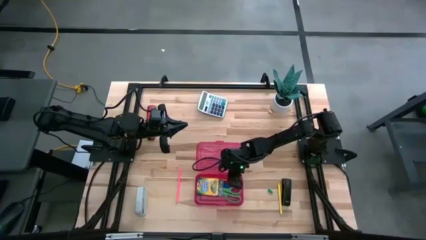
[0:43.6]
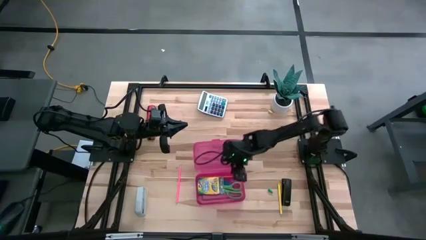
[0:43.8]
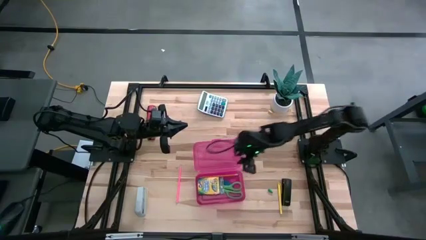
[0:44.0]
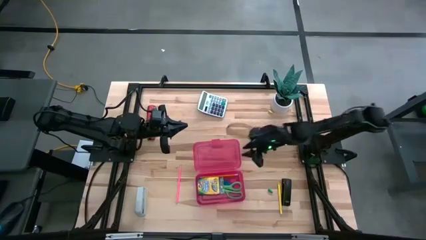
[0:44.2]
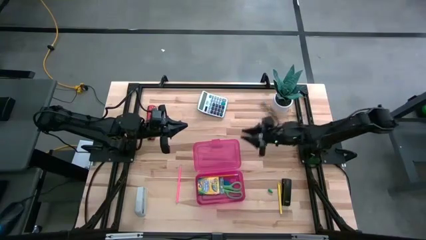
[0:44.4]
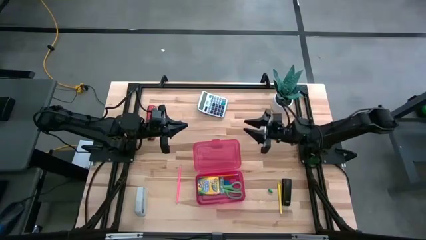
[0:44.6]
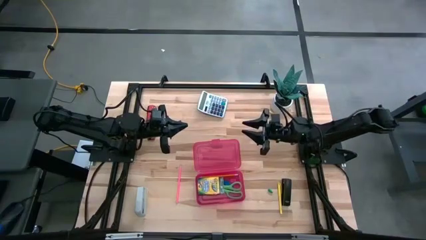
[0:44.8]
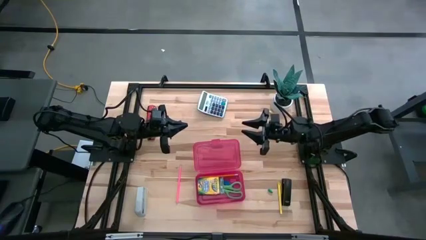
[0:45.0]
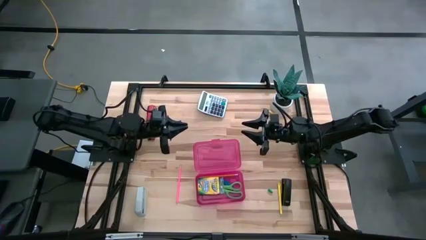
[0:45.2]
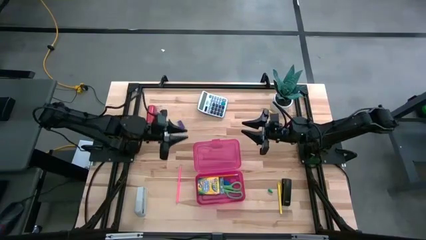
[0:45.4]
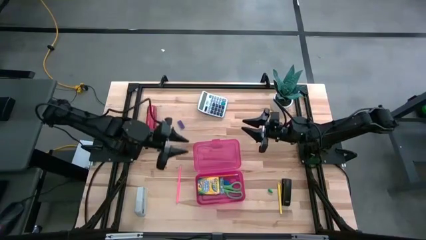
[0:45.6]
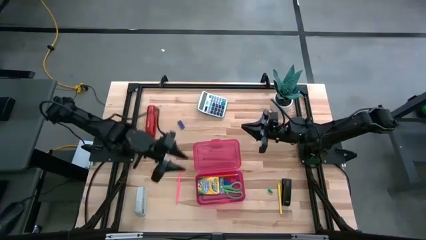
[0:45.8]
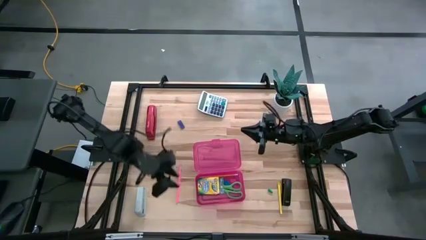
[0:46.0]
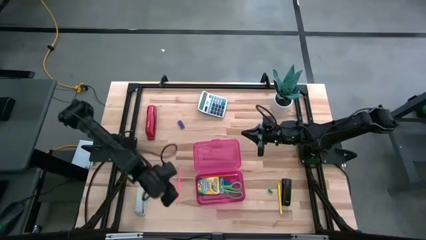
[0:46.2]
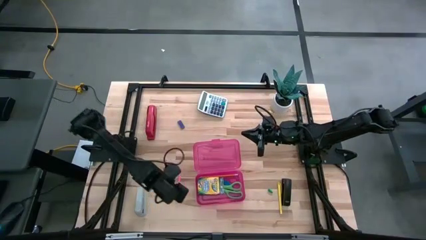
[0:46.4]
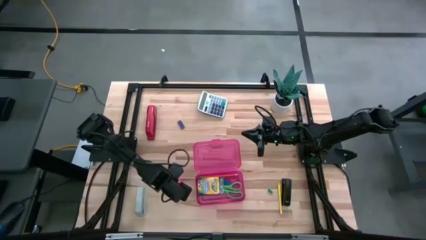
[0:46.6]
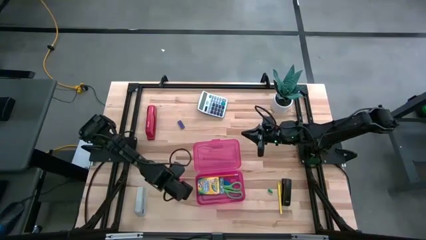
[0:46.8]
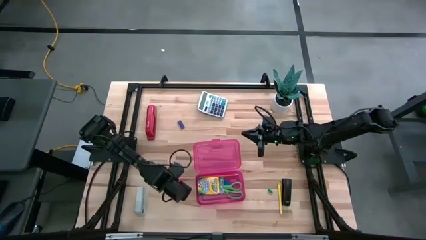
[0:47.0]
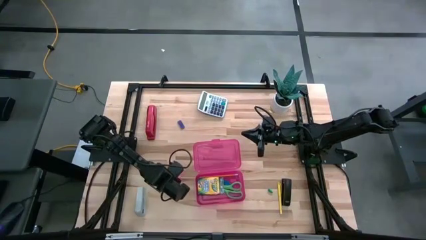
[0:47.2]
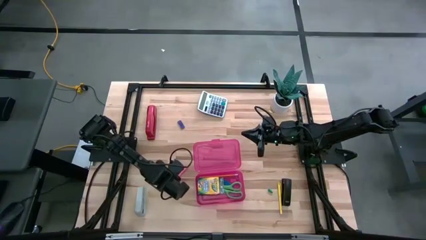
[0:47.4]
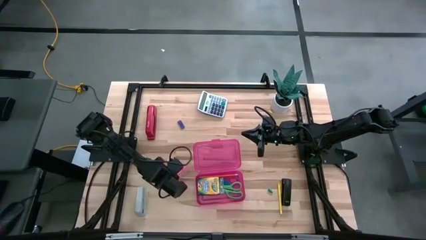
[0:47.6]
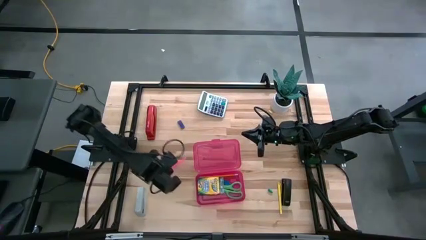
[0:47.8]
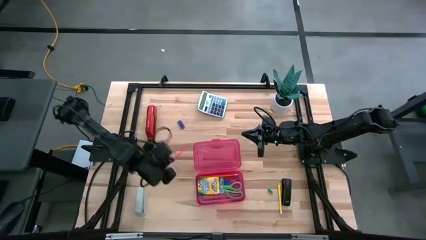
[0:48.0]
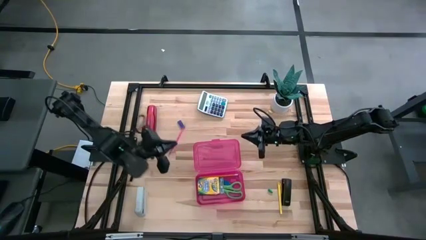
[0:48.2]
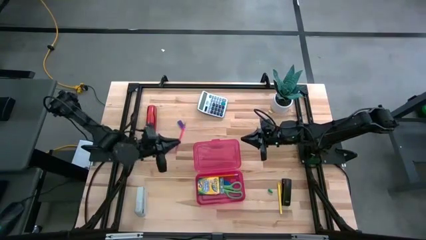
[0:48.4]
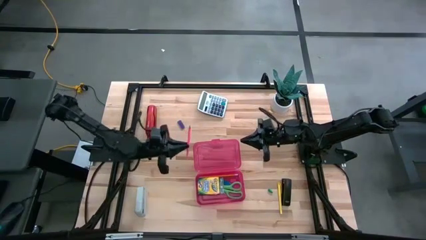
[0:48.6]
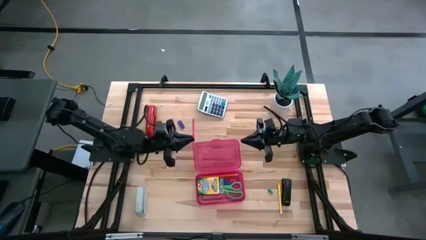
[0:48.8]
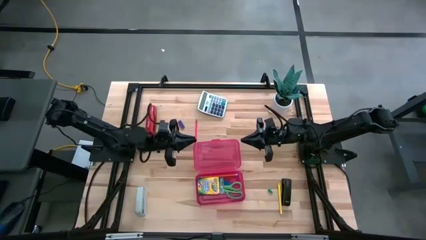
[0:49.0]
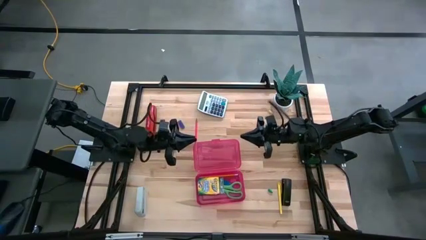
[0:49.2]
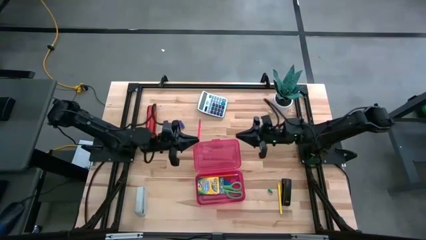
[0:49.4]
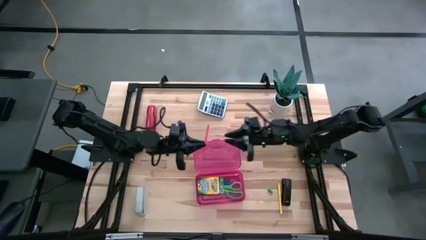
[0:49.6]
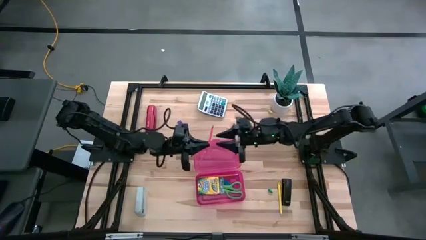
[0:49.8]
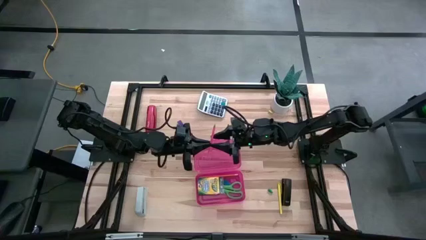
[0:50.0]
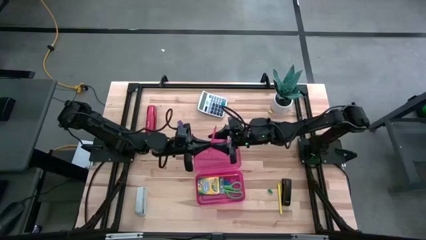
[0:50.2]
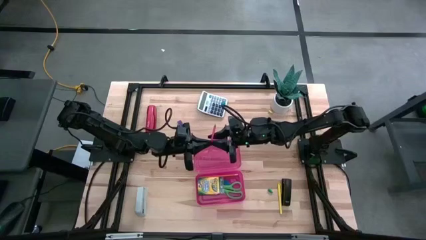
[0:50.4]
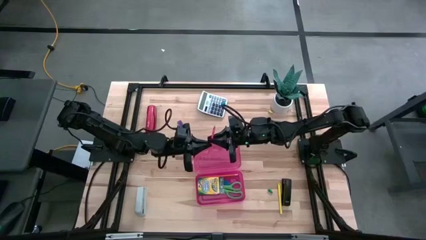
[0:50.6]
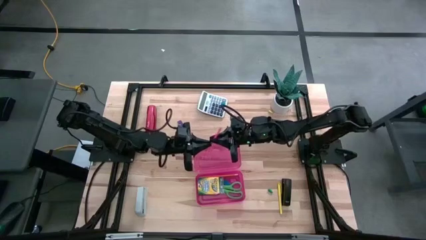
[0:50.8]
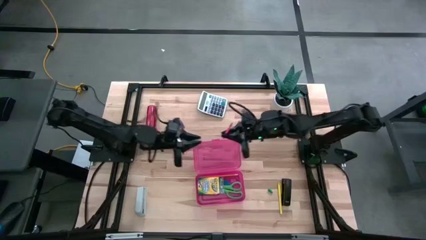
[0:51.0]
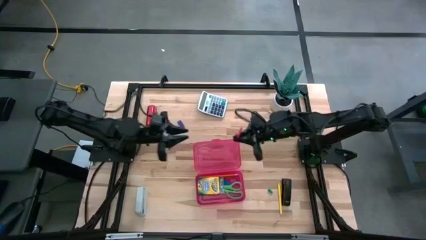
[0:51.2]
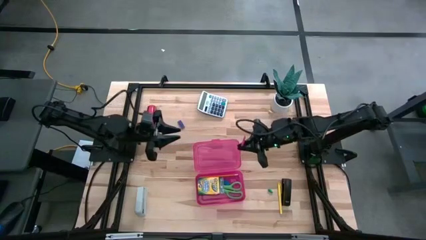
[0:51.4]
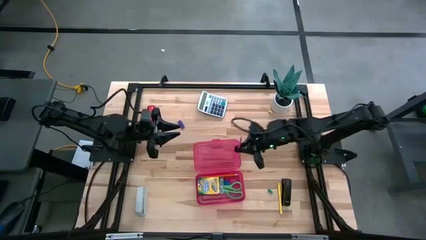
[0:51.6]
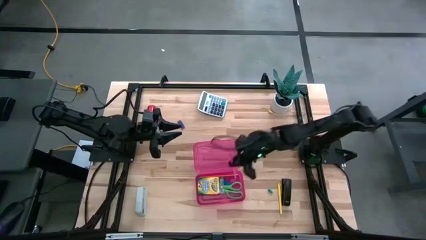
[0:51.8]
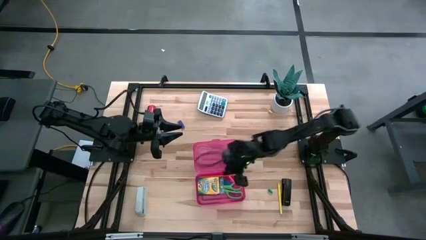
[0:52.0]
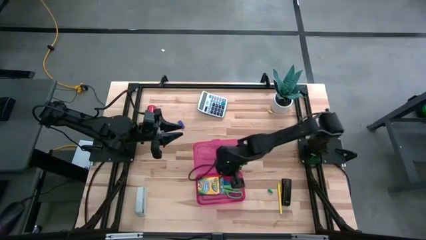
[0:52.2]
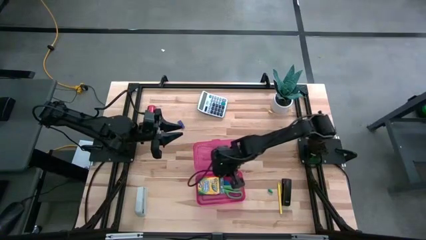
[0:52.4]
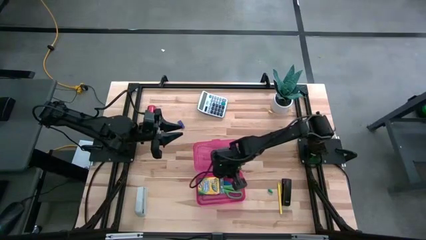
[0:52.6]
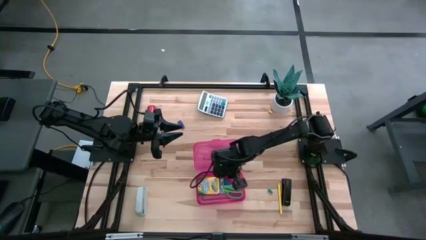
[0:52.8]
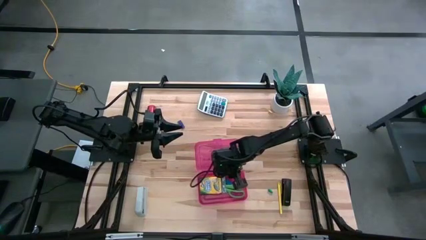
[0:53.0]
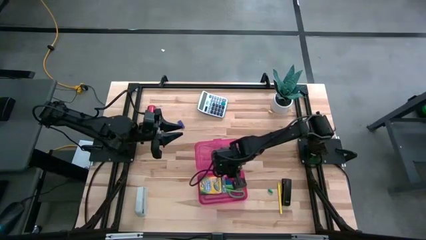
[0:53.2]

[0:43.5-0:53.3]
Task: Pack school essentials
Put the pink pencil into the pink supply box

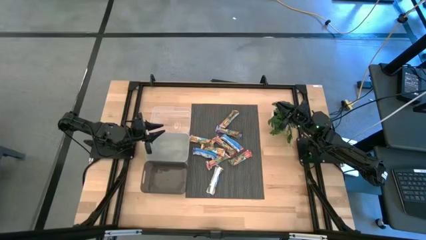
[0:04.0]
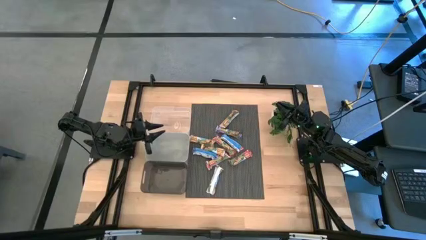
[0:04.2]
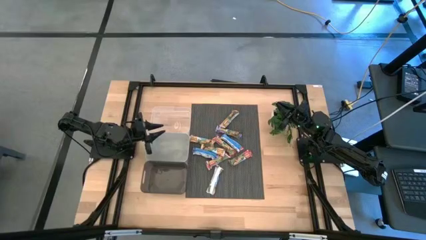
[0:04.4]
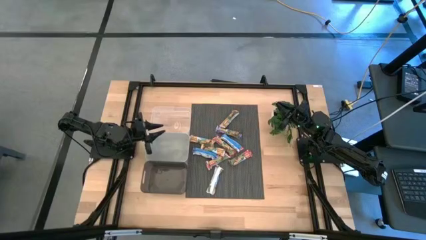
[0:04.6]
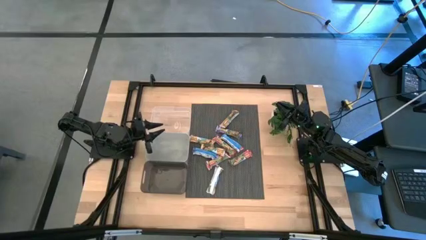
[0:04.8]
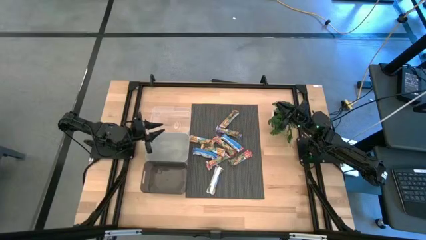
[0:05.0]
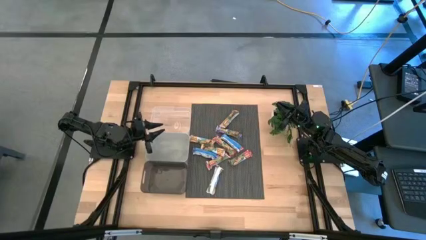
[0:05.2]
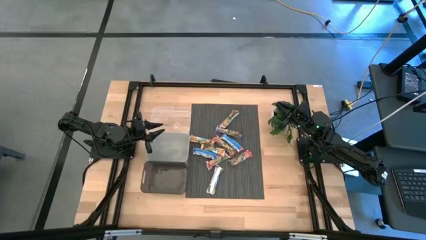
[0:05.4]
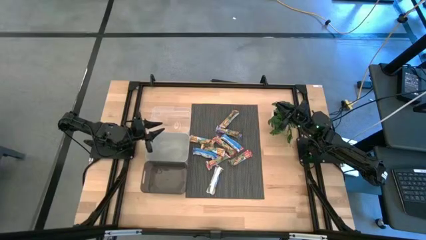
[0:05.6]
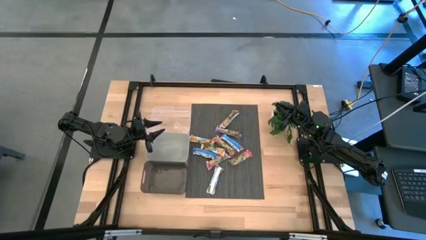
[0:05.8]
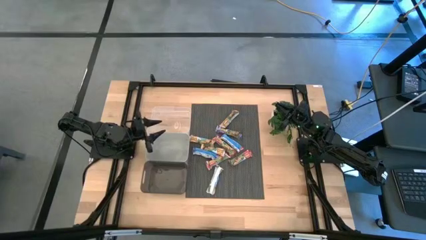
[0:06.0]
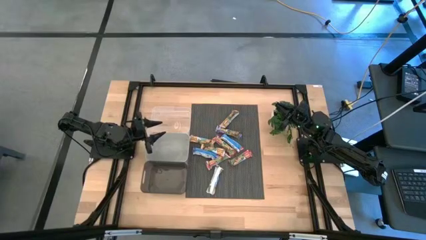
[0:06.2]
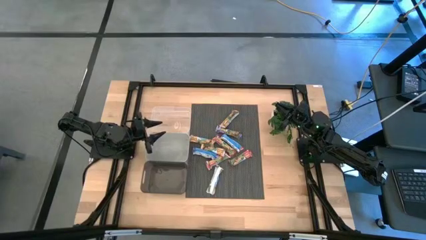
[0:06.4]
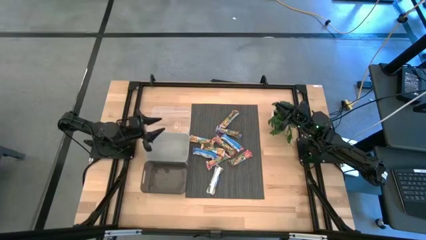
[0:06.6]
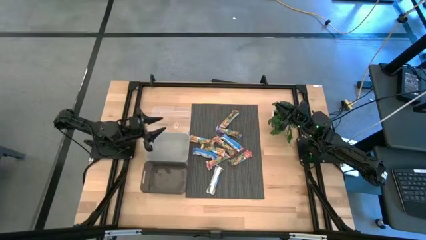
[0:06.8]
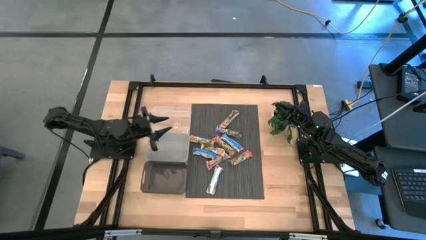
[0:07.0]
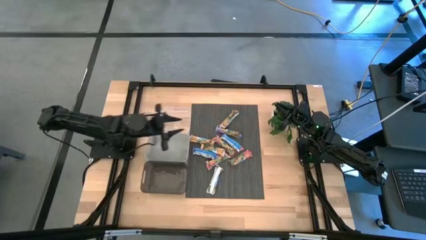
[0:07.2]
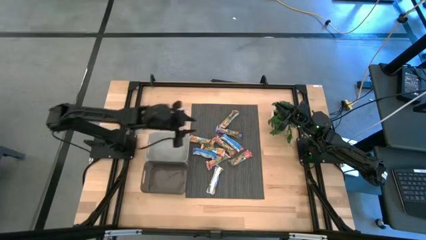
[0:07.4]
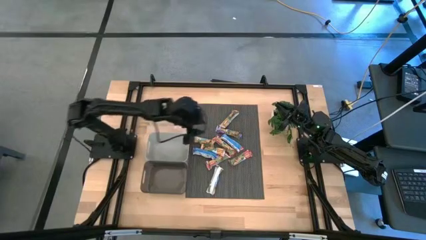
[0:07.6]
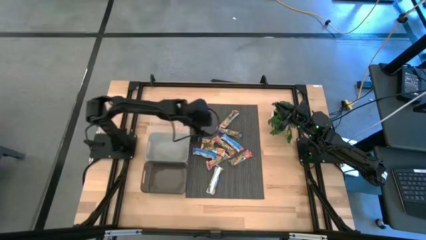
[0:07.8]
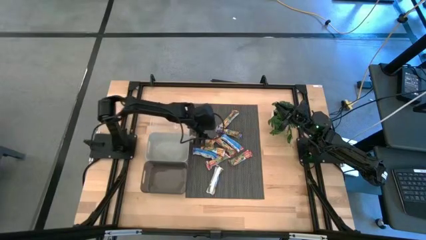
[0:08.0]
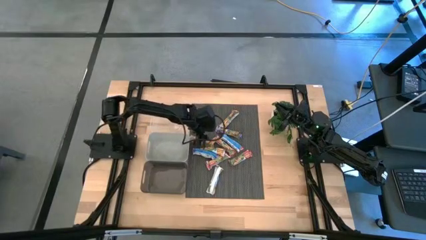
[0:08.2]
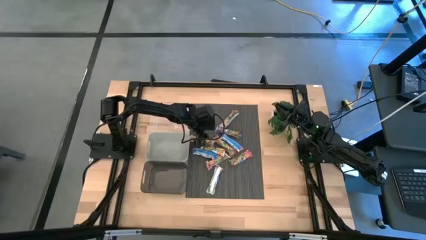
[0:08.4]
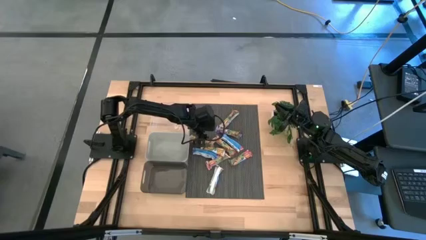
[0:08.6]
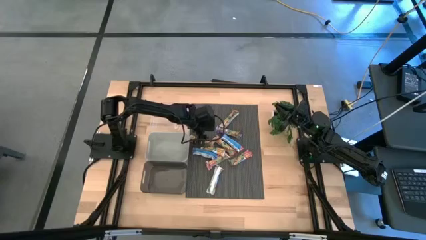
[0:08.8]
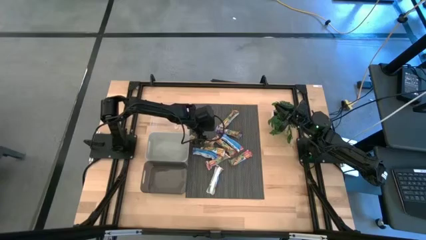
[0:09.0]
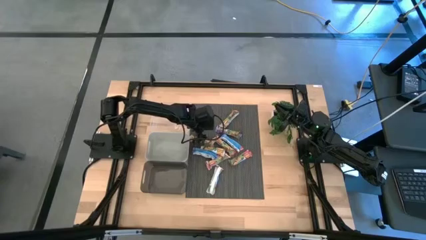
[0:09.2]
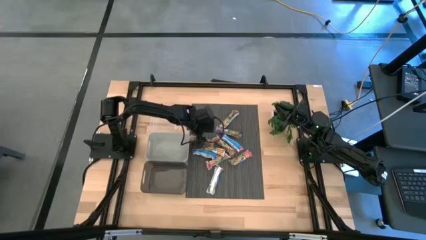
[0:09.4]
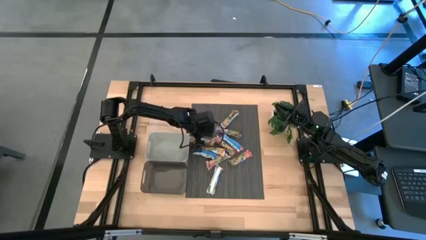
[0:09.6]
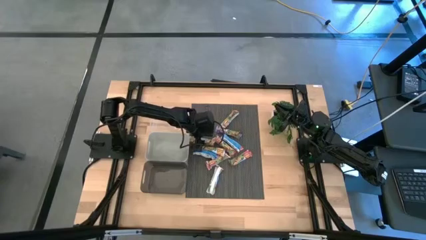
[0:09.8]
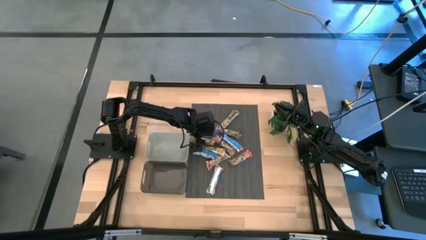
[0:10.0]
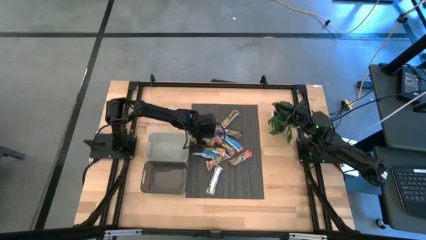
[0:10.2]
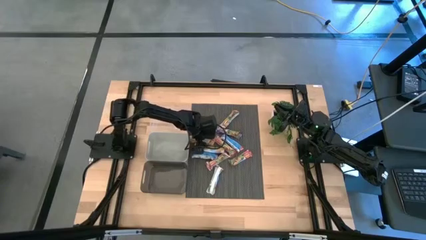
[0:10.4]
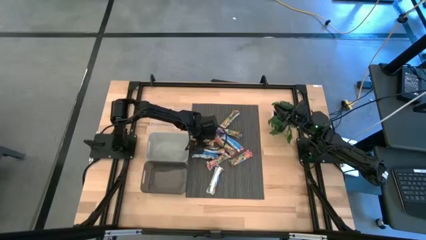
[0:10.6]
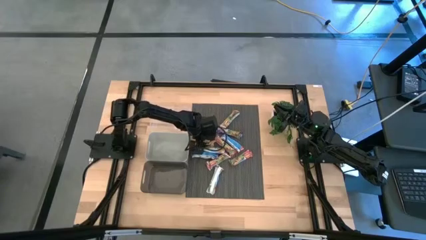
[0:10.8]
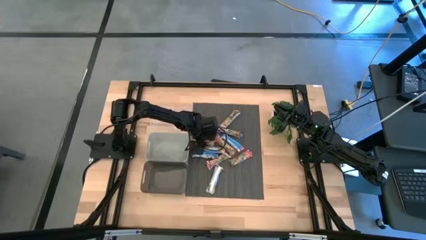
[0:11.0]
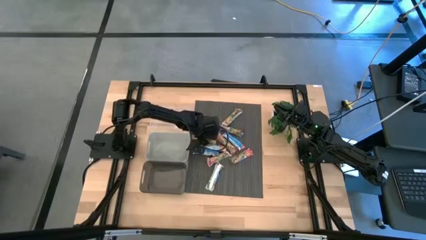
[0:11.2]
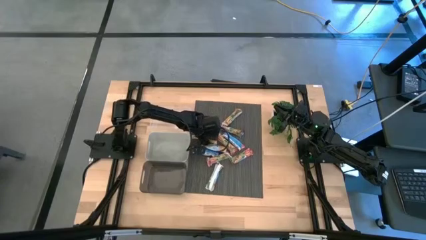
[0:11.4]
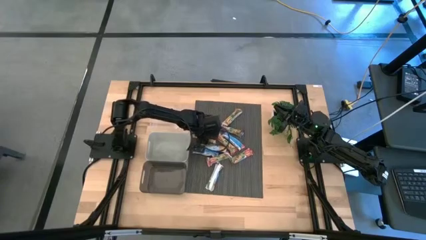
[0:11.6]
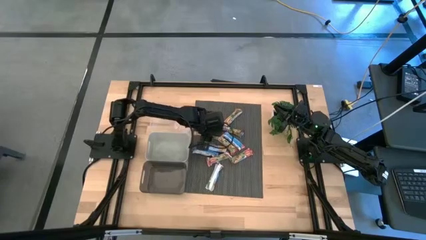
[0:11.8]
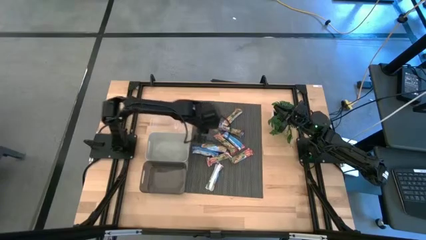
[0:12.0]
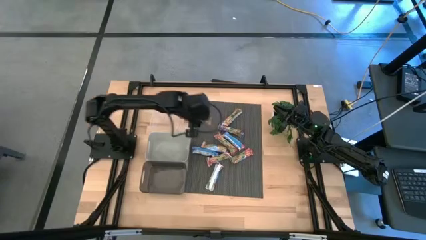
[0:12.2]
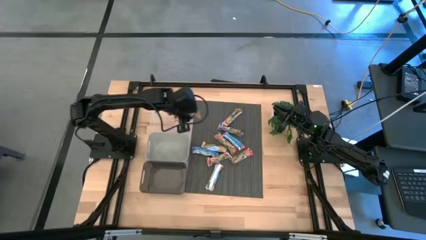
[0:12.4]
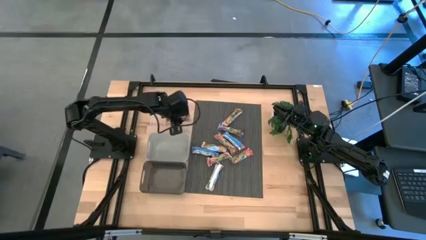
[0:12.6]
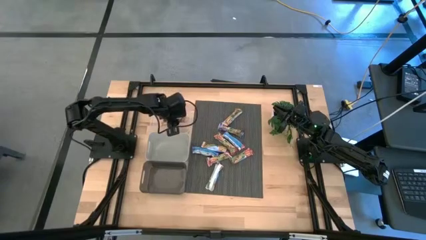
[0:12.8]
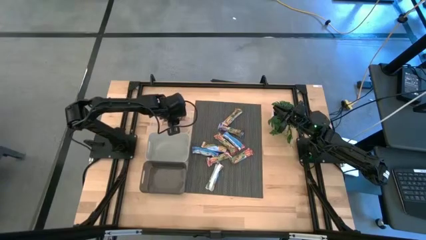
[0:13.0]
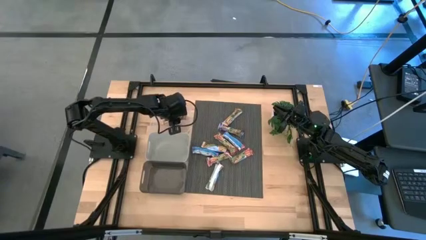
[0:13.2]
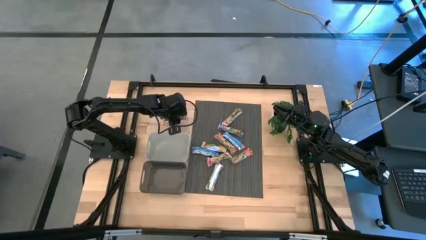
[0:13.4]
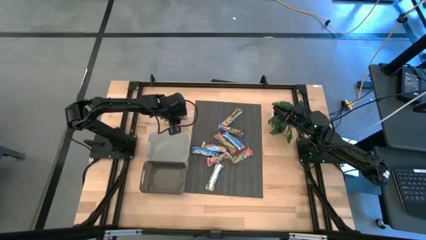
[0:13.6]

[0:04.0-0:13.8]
Task: Pick and place Granola Bars by type
Put the yellow granola bar into the transparent bin
